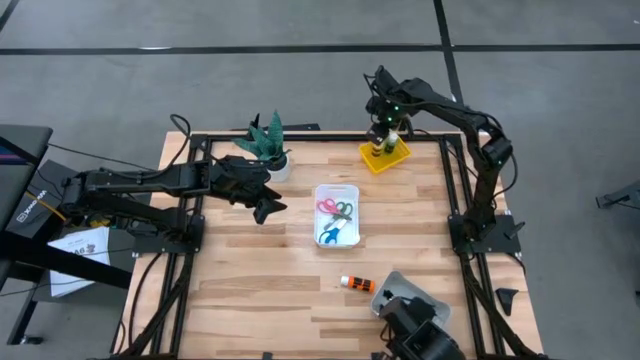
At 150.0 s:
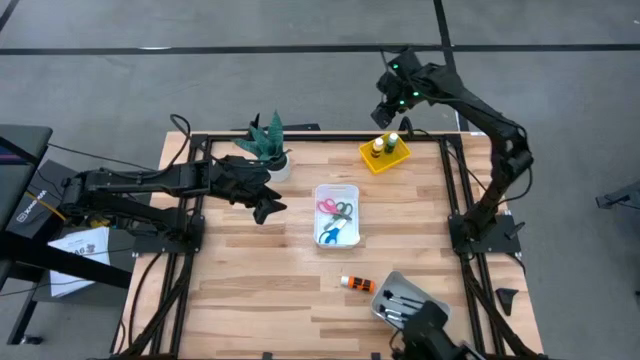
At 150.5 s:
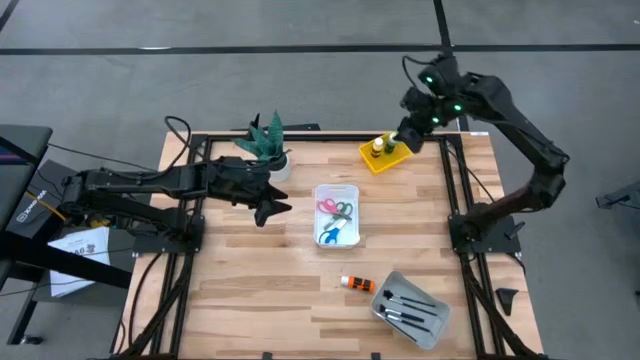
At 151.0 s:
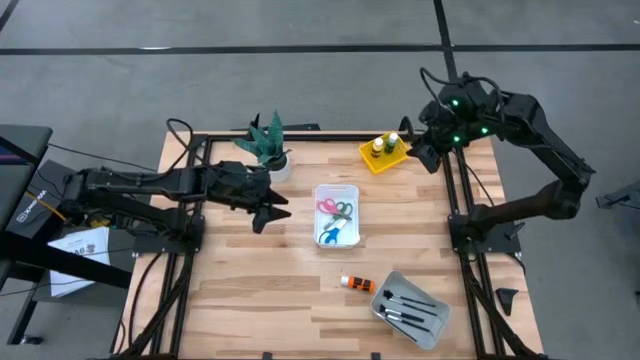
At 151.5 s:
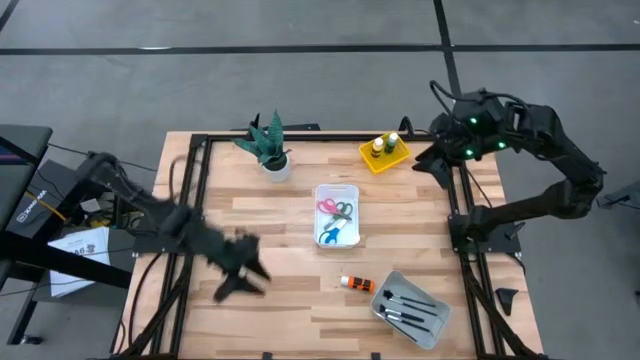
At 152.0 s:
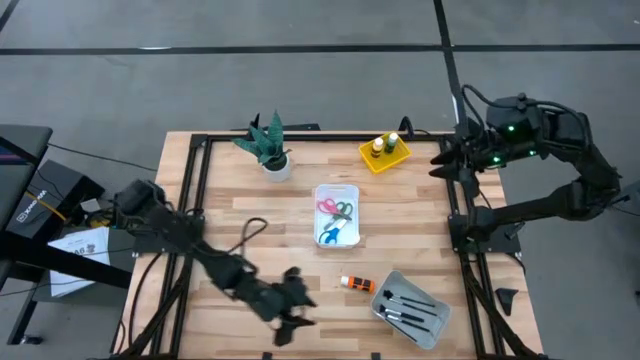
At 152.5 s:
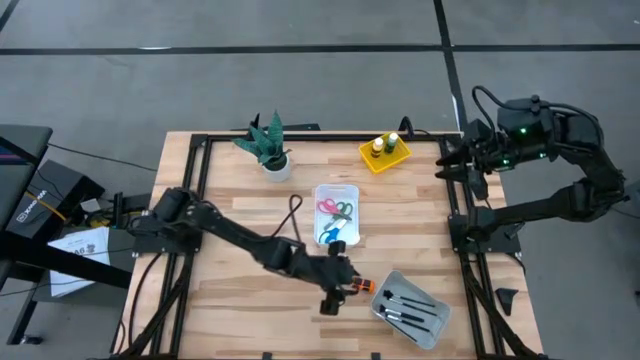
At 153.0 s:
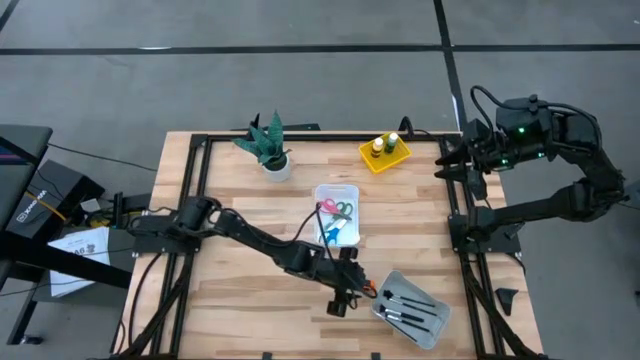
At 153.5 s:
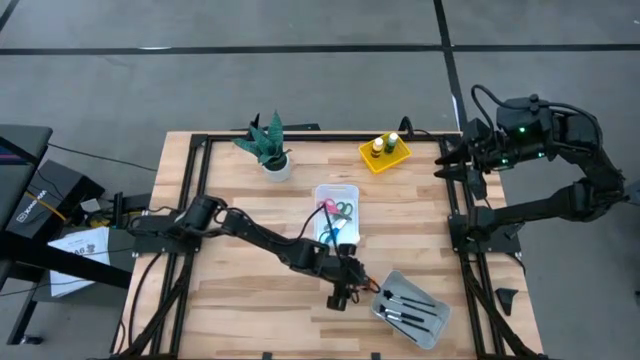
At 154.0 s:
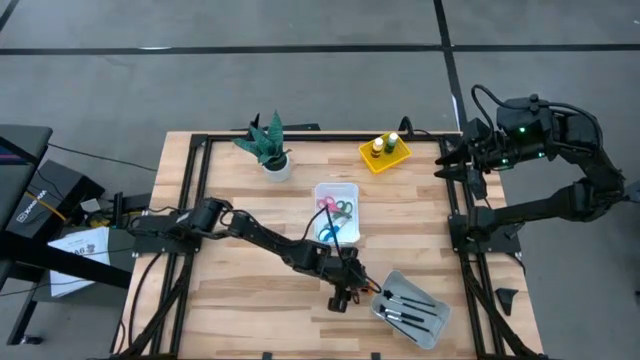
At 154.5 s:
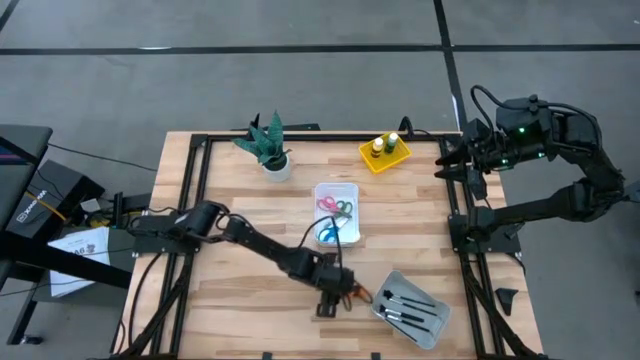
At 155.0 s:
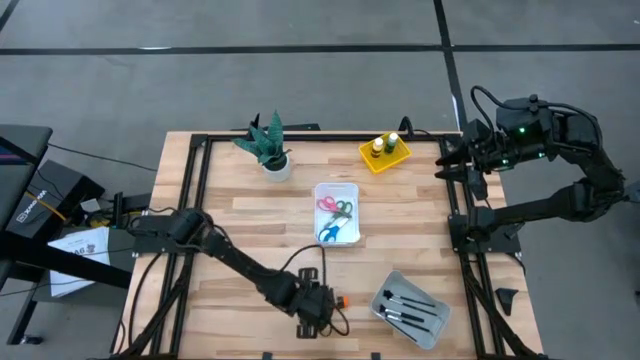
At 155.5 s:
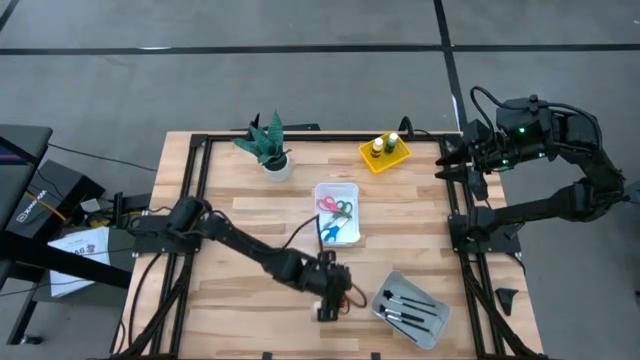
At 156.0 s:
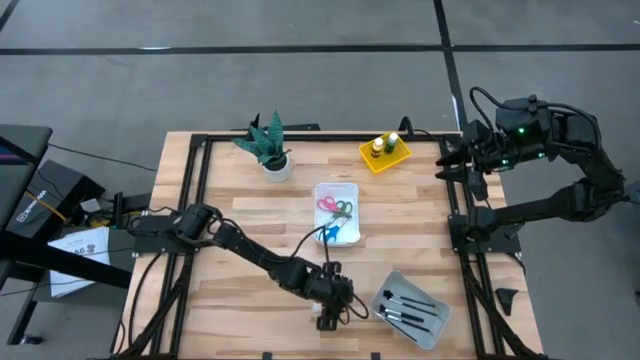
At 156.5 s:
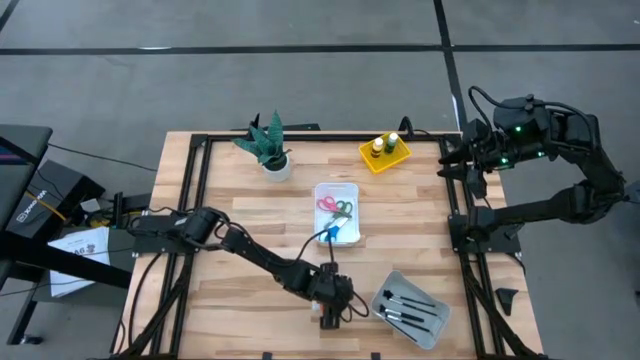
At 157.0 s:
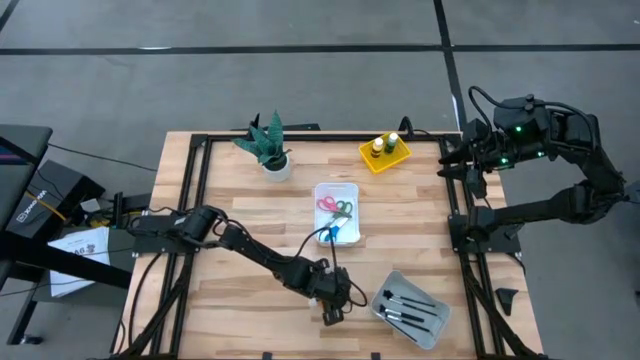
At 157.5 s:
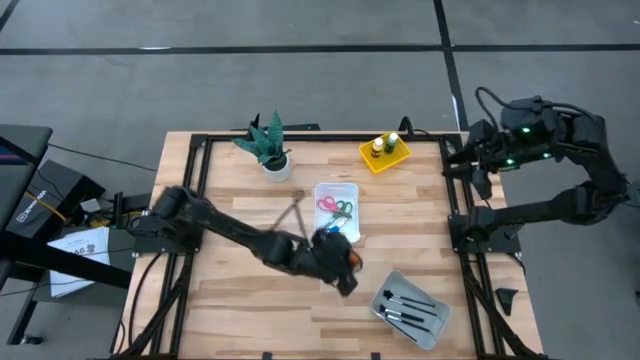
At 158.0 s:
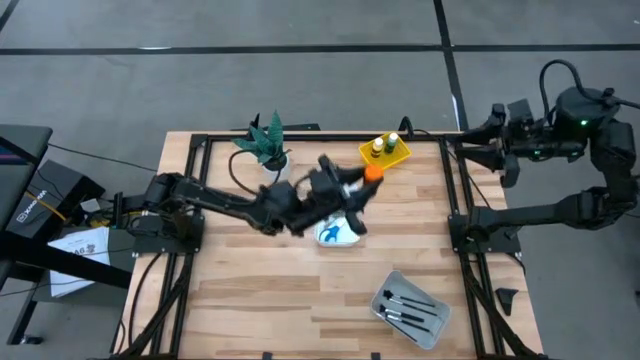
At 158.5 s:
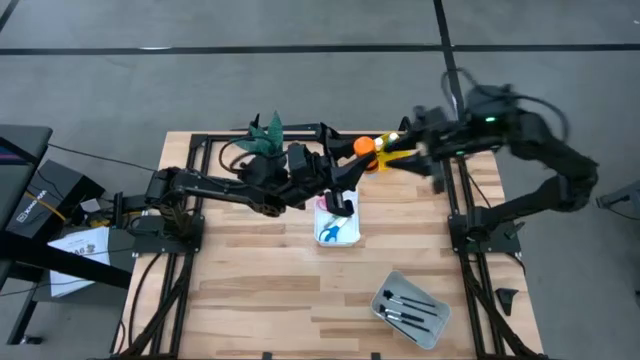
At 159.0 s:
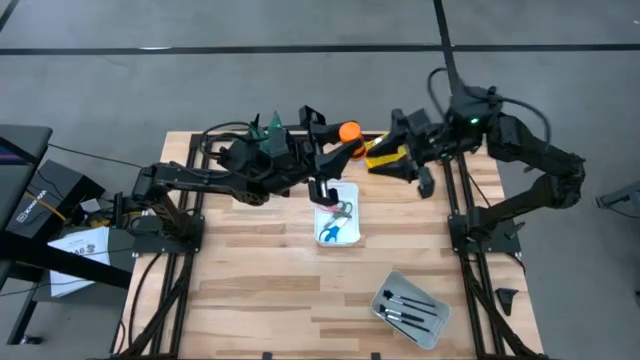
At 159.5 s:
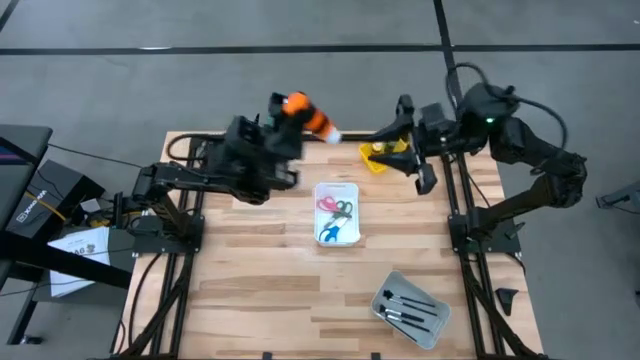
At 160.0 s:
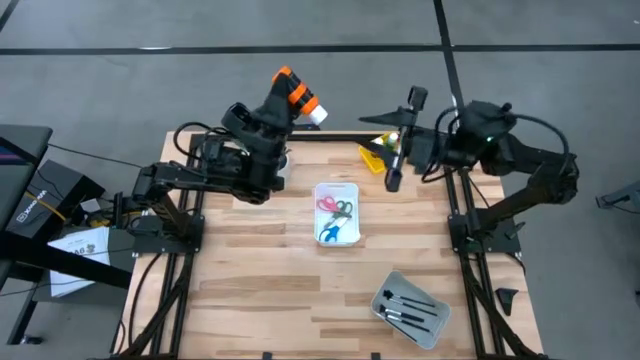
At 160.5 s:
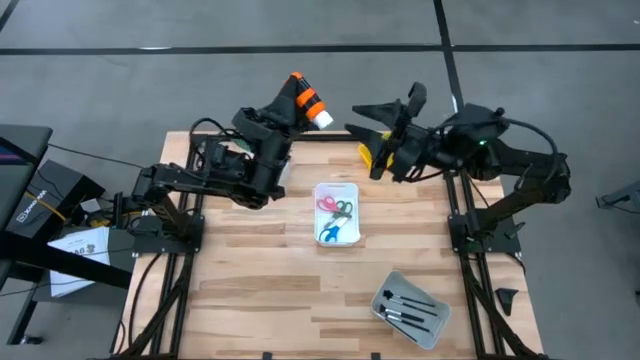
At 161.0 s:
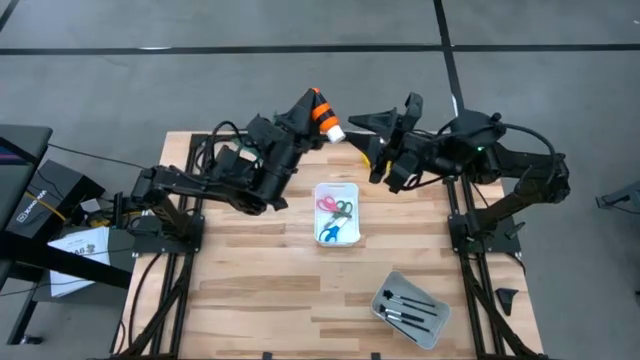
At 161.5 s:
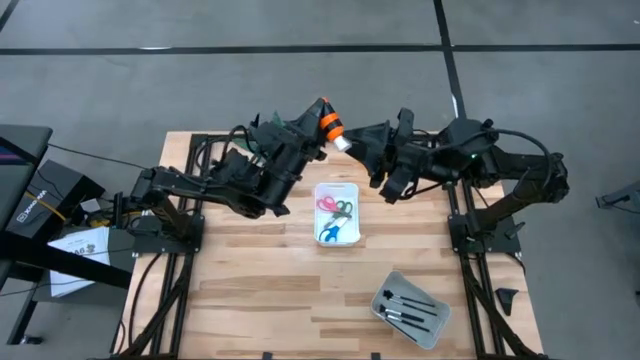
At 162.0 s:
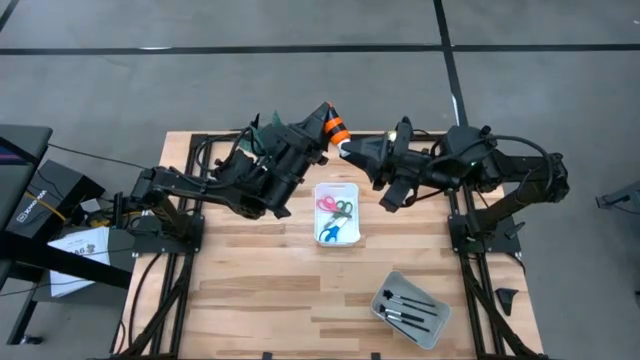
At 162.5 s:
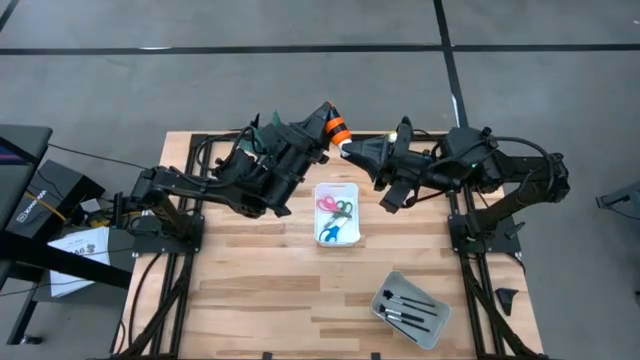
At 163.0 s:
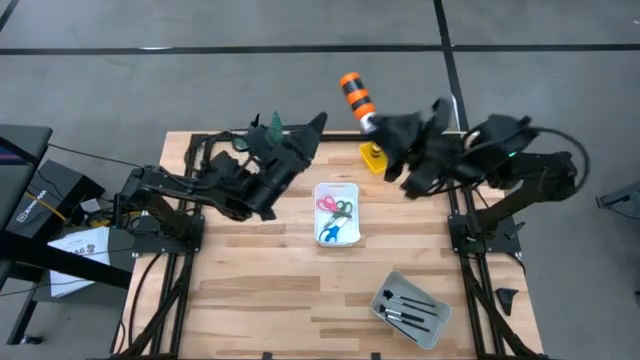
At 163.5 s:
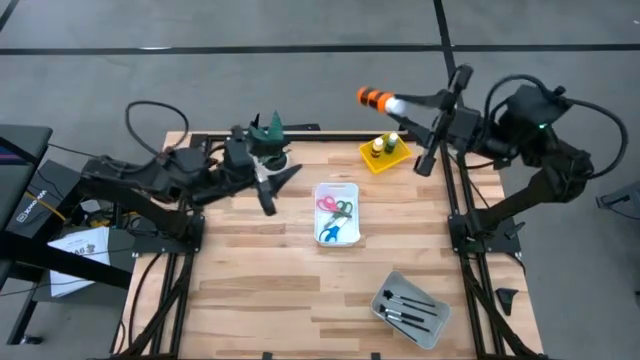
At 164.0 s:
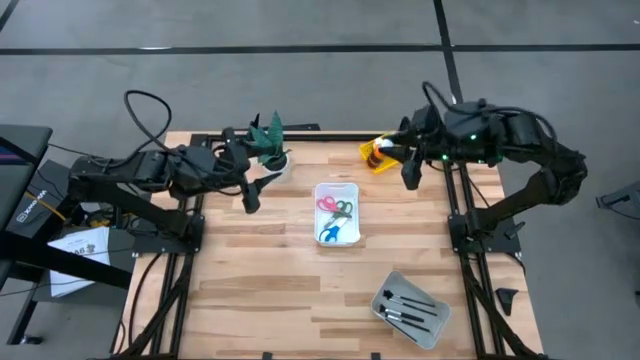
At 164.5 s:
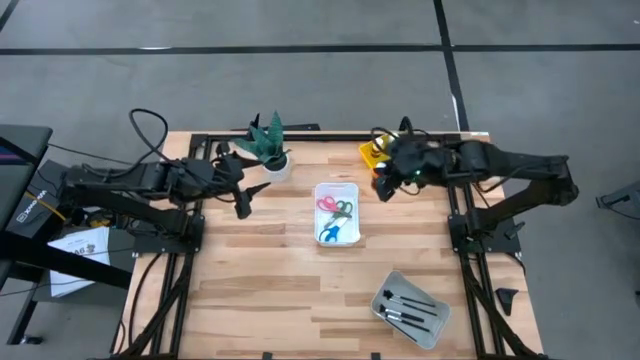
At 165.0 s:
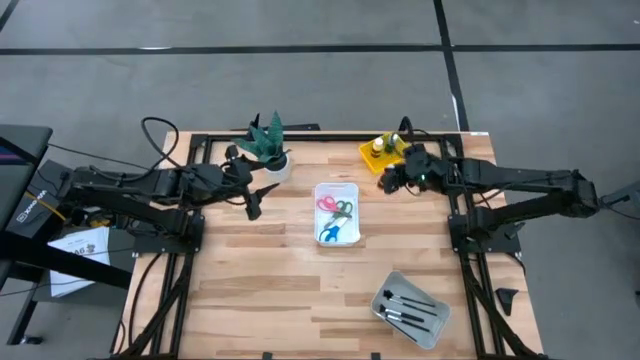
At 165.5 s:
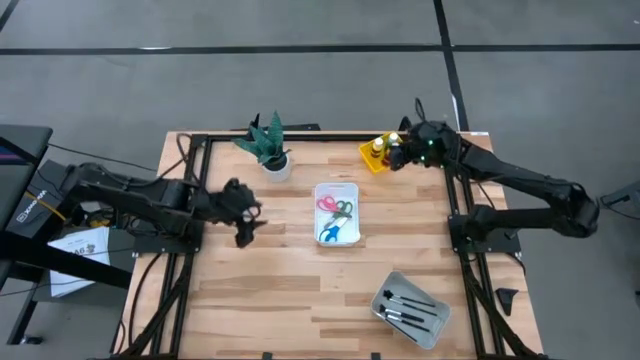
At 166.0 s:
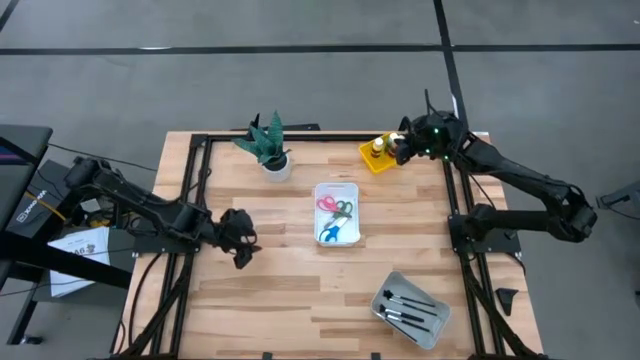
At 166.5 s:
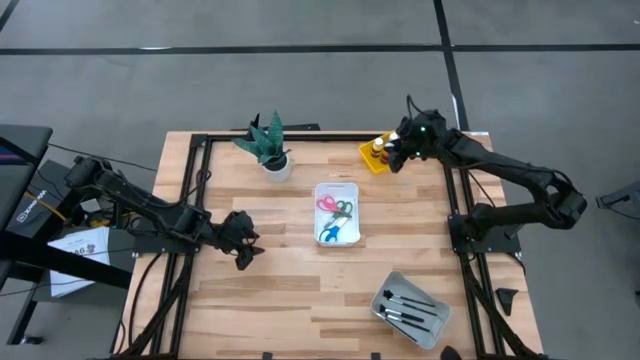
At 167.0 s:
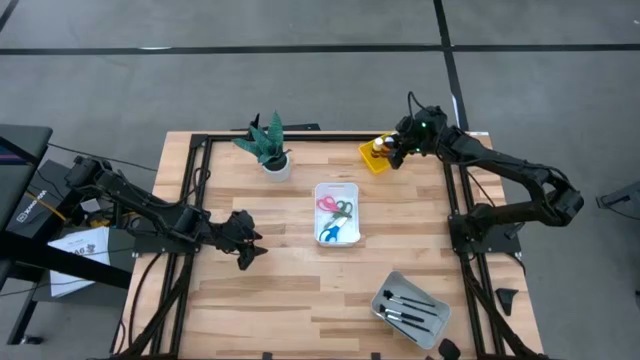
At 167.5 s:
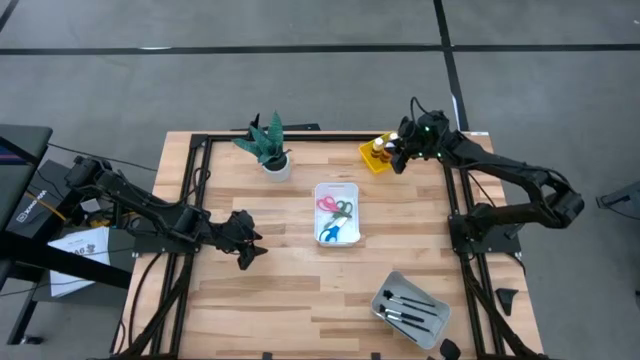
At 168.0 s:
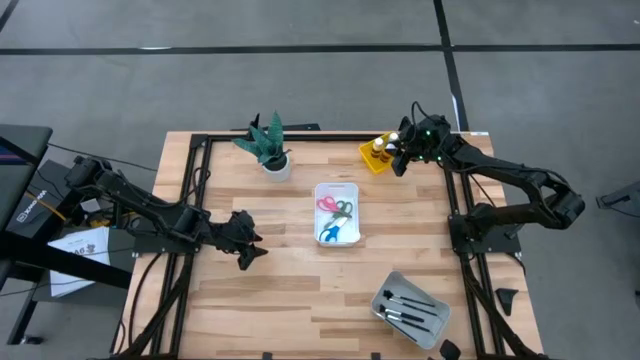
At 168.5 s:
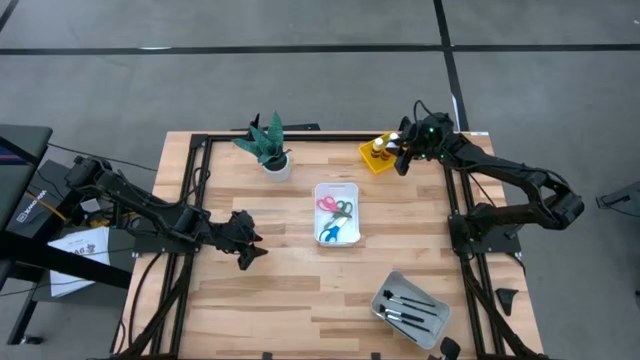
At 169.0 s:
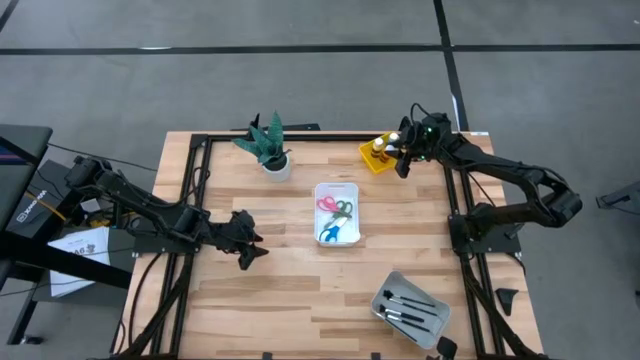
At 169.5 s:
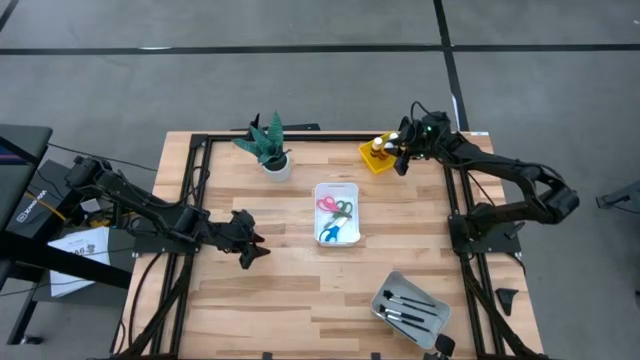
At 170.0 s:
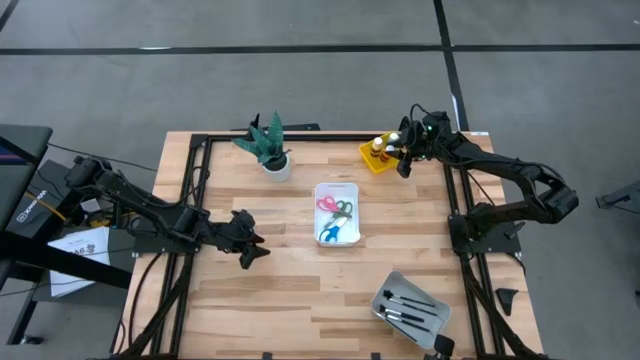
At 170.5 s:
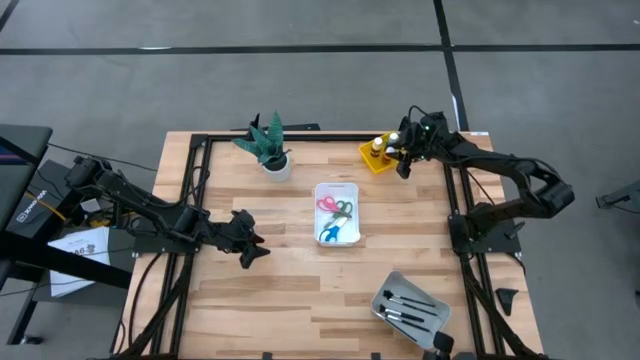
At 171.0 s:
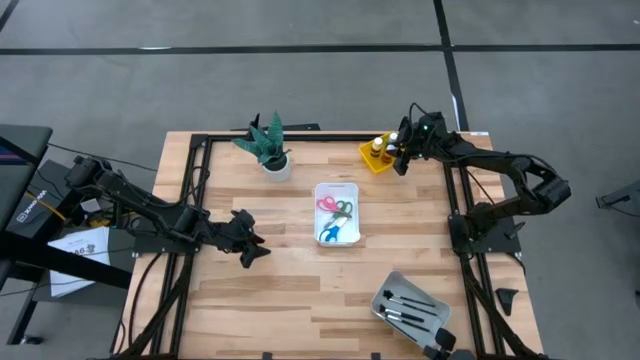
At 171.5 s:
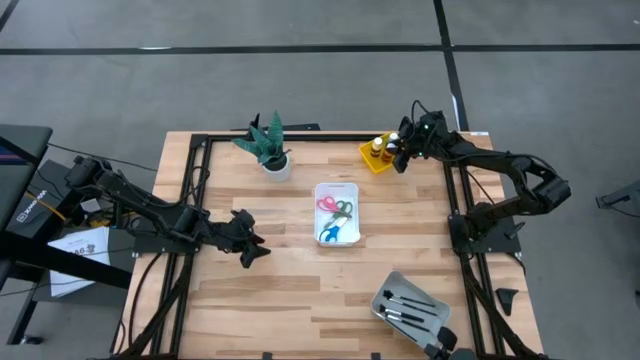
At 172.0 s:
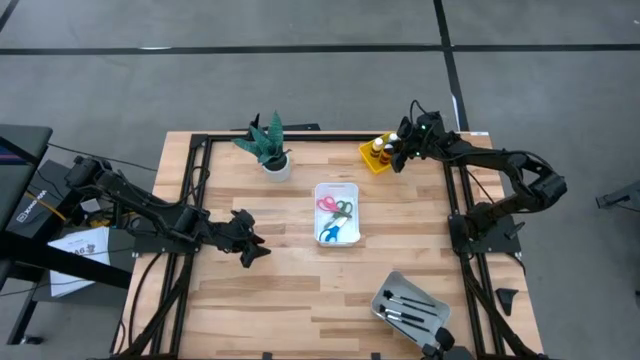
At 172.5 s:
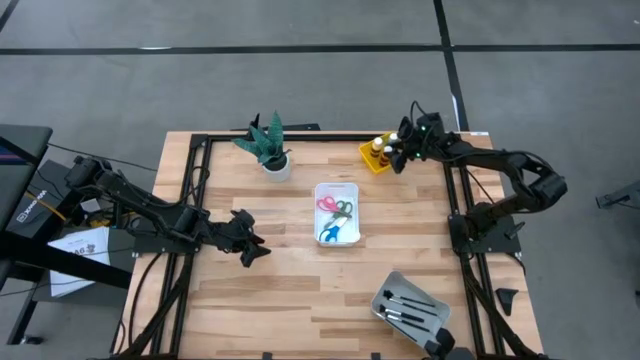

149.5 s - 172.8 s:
Task: Pick & Place Paint Supplies
Put the orange acrylic paint bottle into the yellow basket
